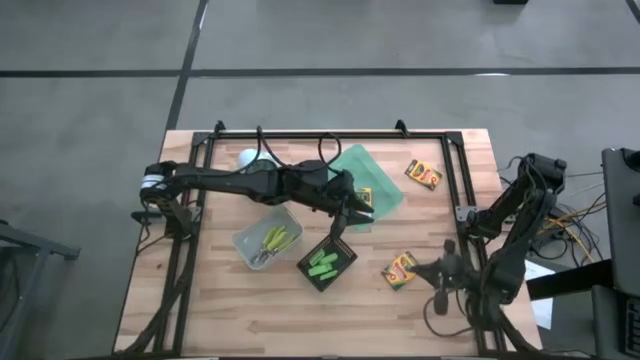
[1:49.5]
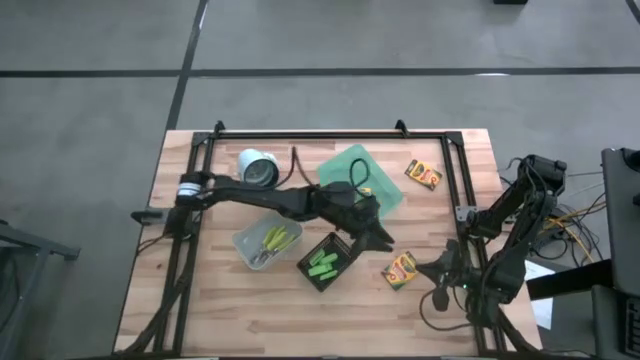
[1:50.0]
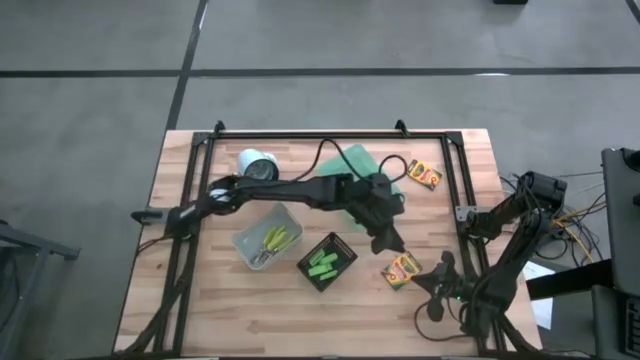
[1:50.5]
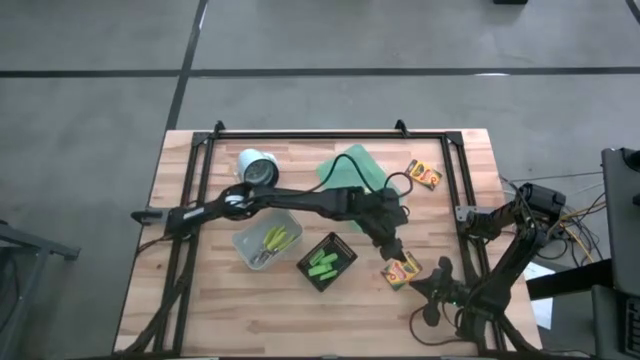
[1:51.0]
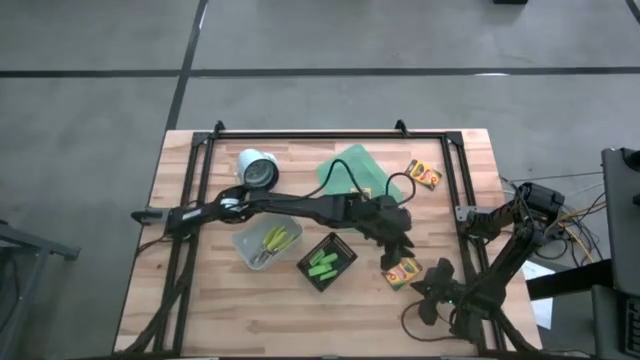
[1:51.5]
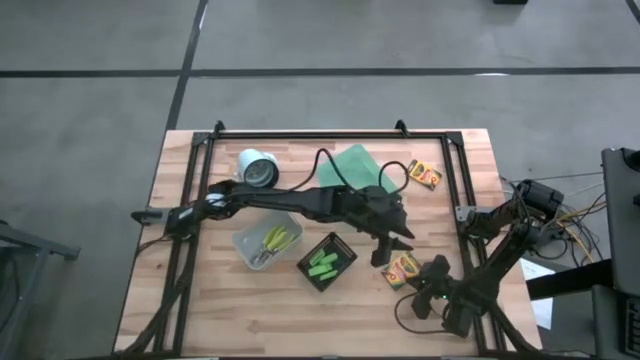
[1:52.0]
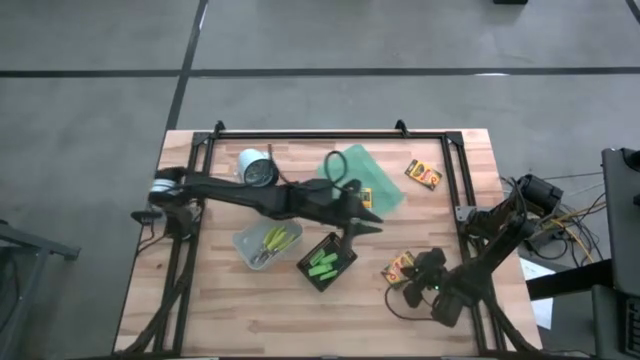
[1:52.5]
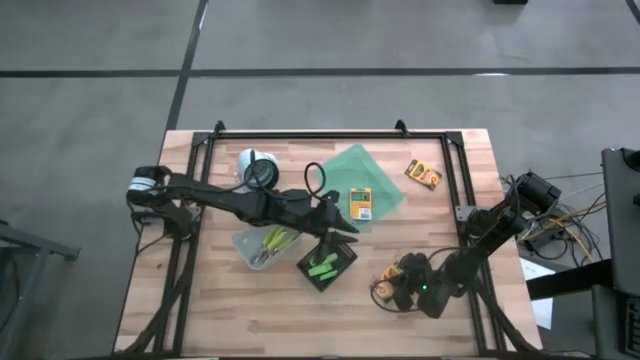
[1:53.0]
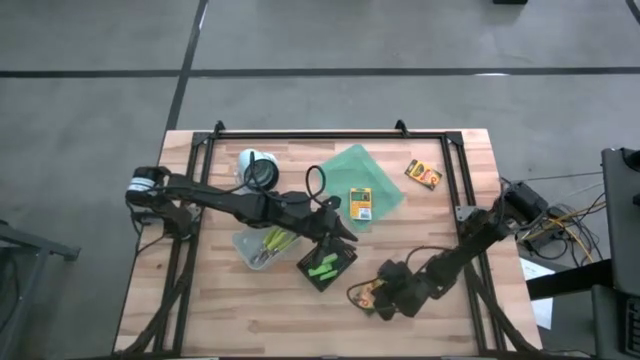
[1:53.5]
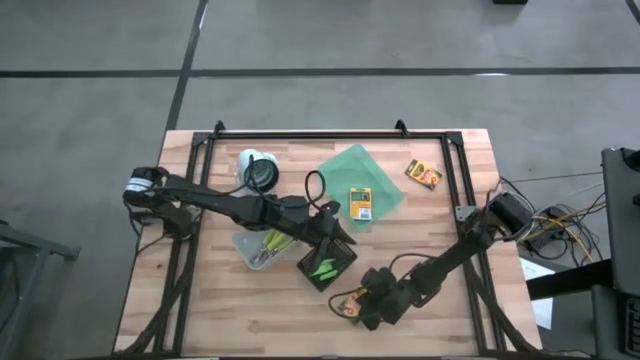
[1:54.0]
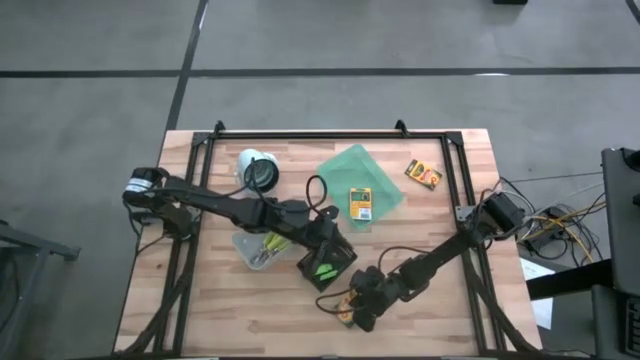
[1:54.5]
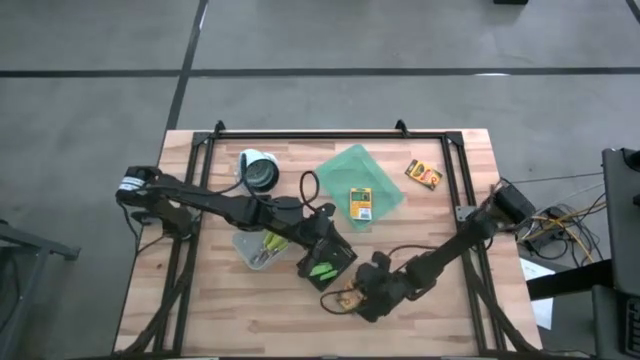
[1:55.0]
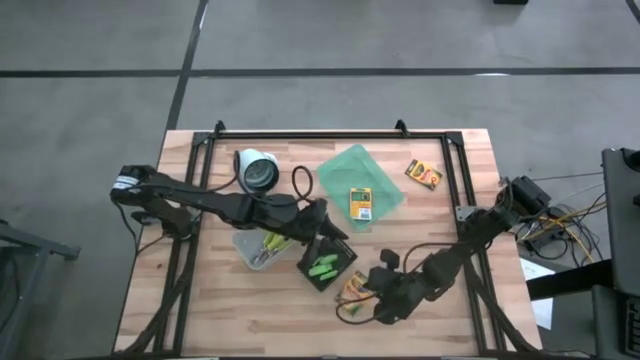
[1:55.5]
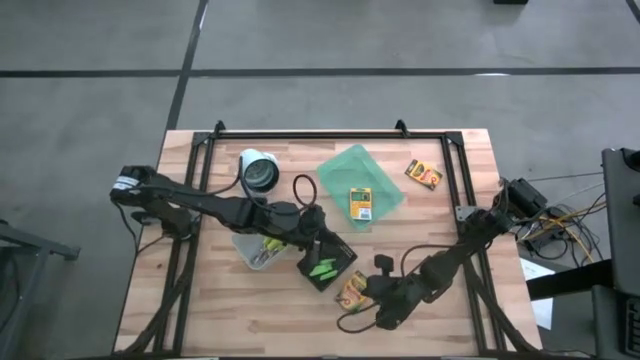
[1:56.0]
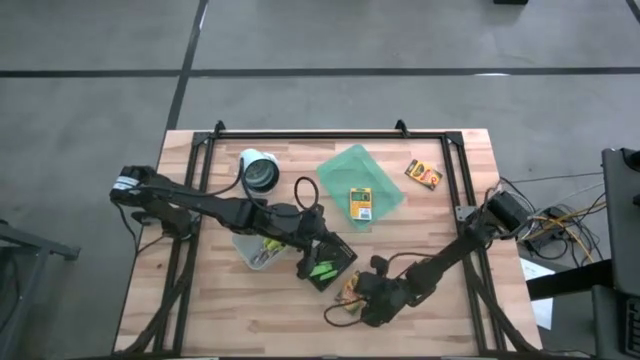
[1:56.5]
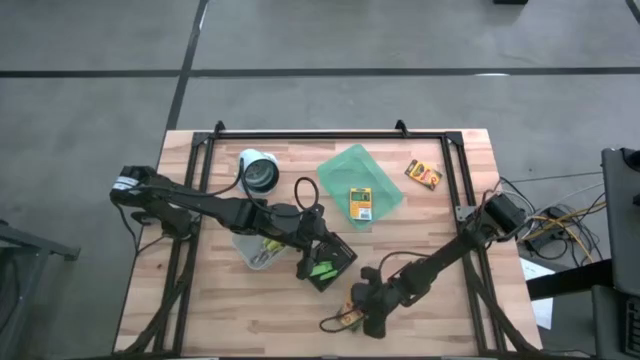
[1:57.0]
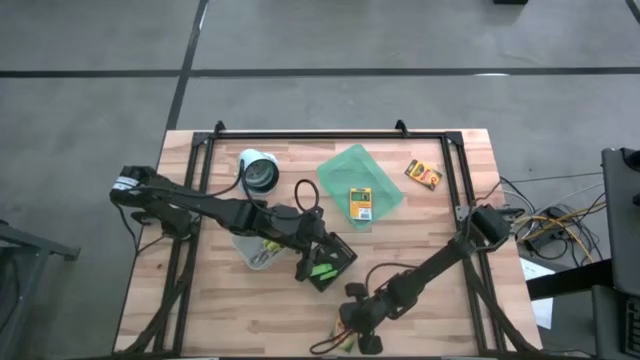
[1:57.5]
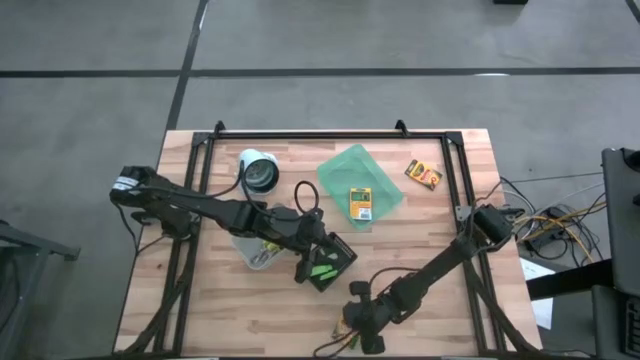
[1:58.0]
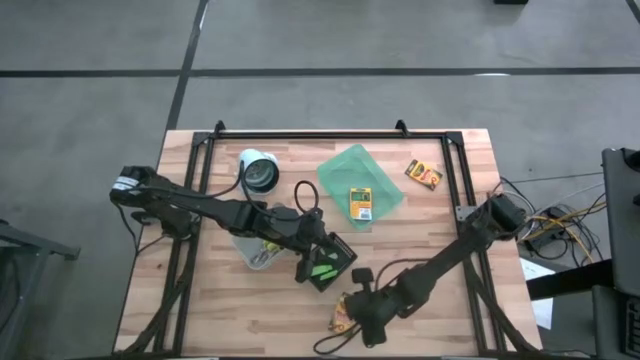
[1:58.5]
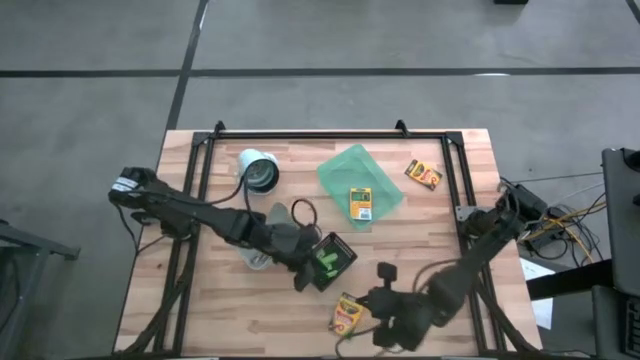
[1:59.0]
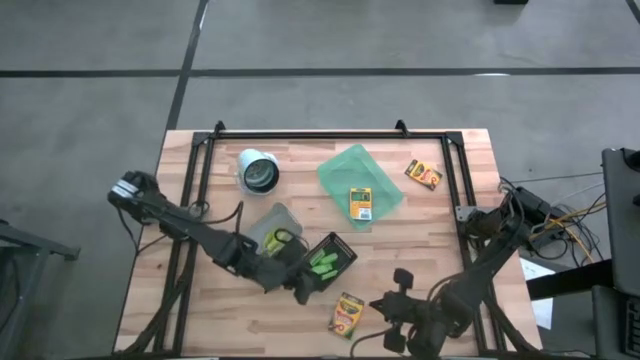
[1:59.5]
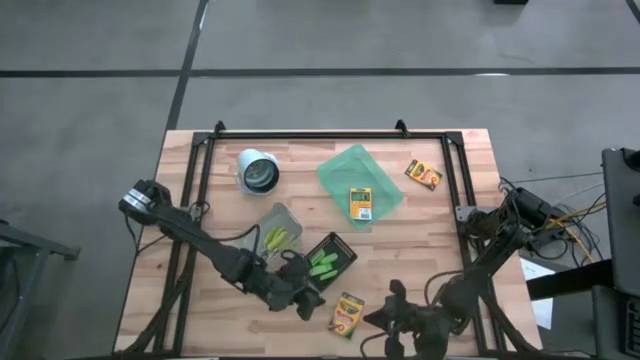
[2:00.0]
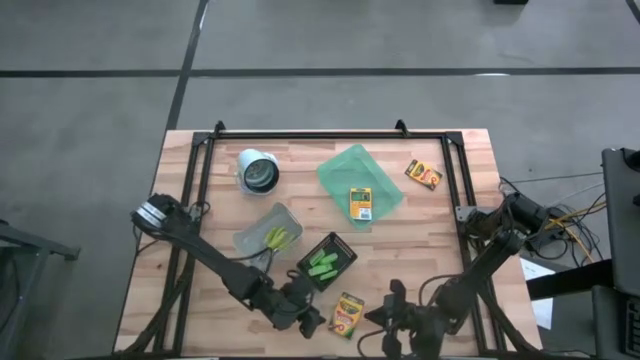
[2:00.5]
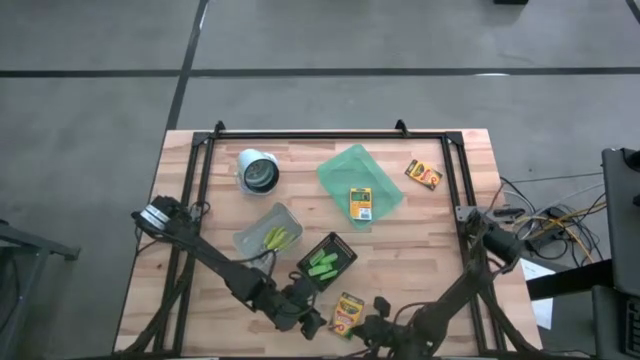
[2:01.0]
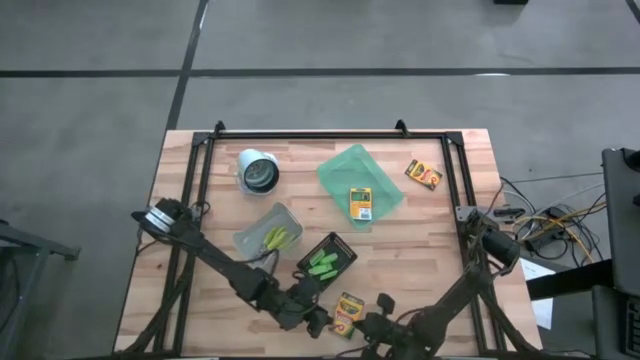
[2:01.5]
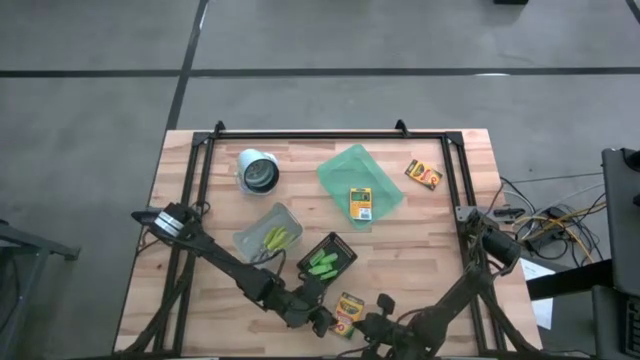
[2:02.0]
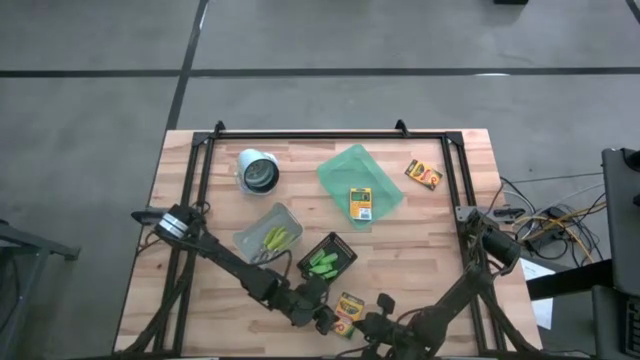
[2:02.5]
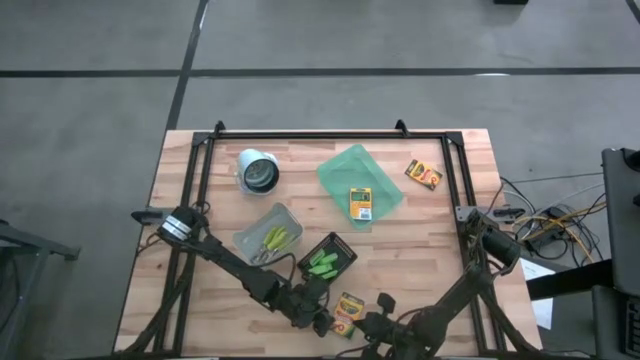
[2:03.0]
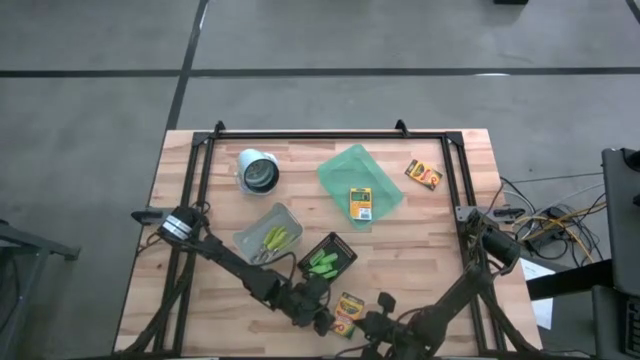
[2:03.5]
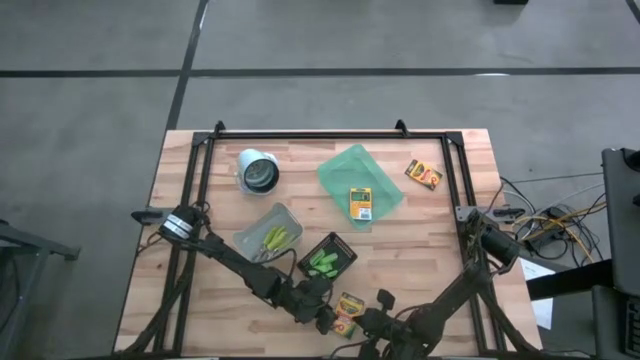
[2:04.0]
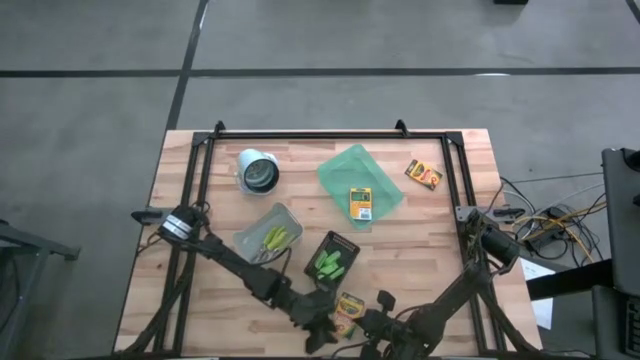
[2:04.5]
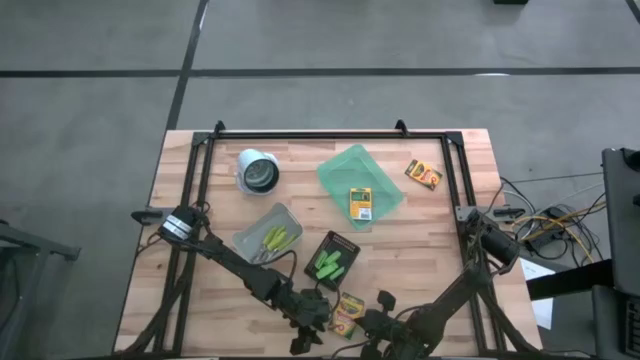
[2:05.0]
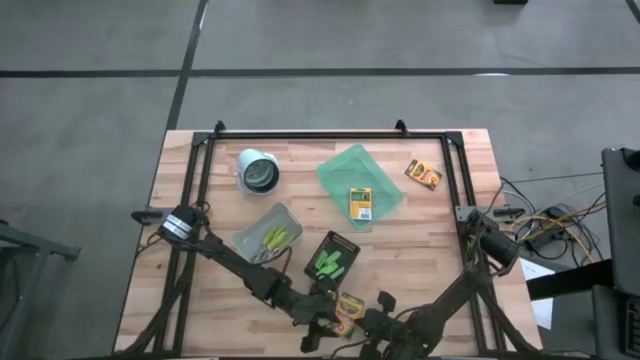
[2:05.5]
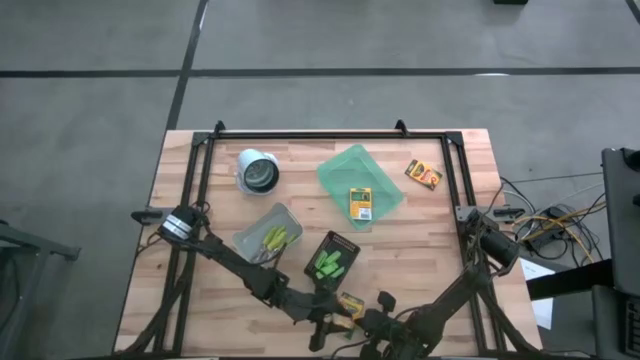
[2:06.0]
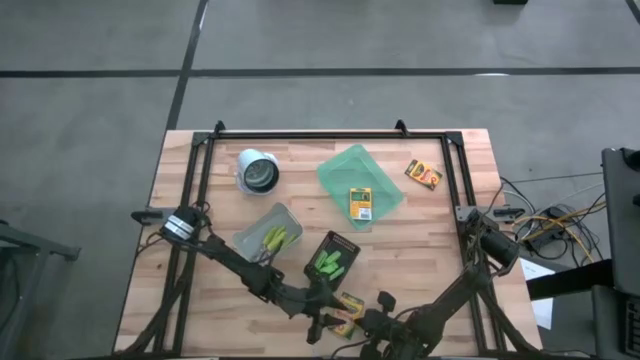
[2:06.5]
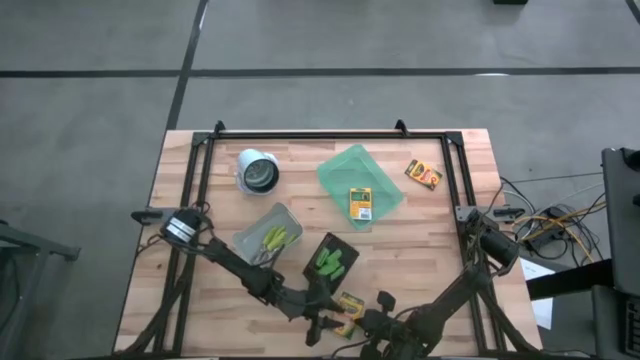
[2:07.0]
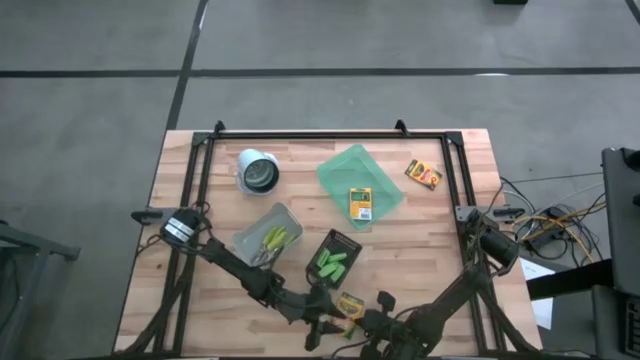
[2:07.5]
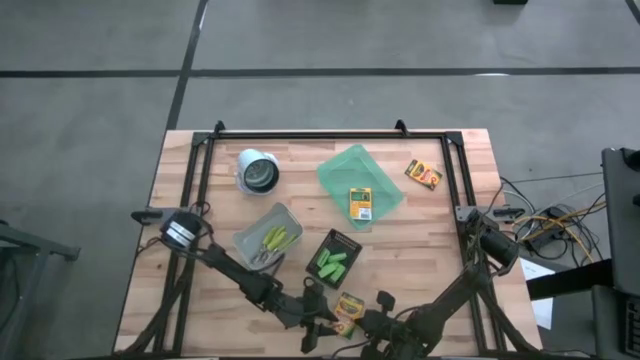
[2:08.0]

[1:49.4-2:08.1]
Task: Pick & Place School Supplies
Put the crayon box into the light green bin
